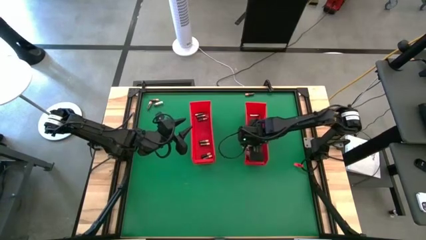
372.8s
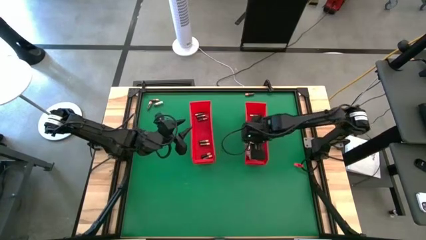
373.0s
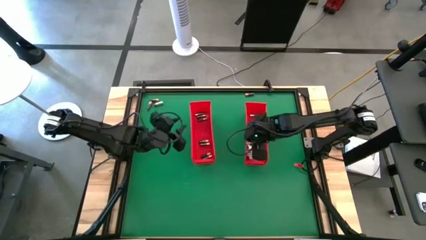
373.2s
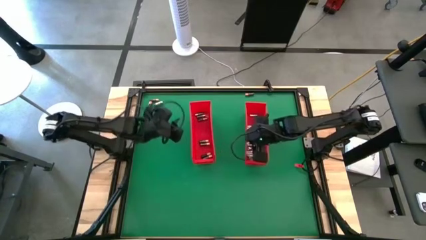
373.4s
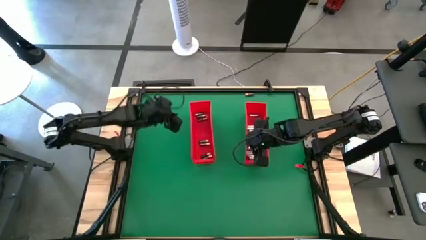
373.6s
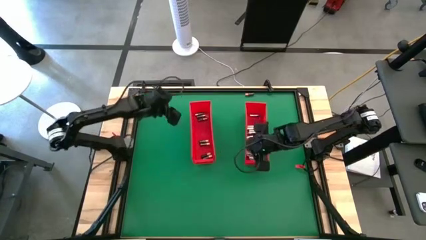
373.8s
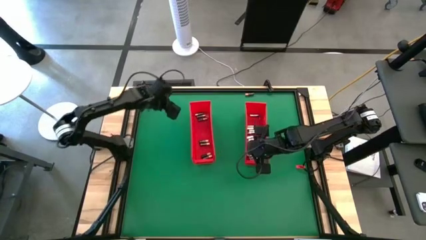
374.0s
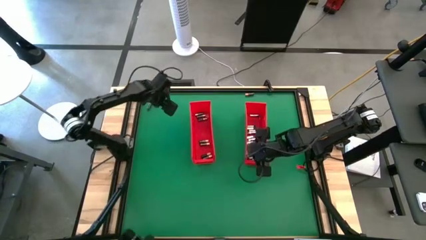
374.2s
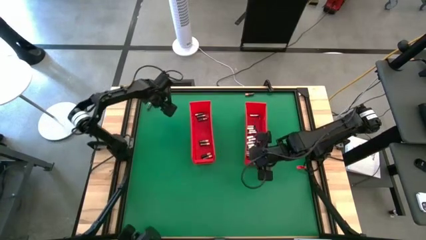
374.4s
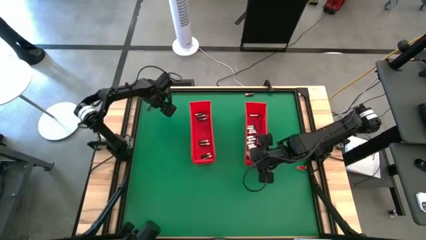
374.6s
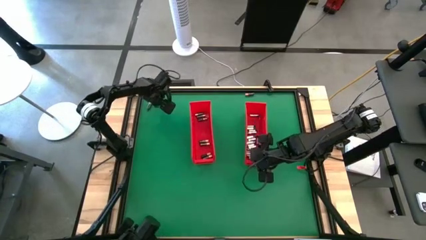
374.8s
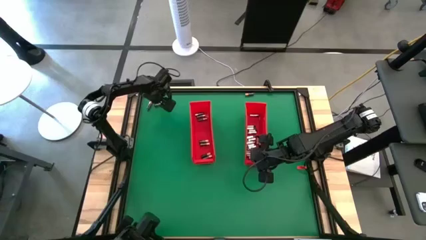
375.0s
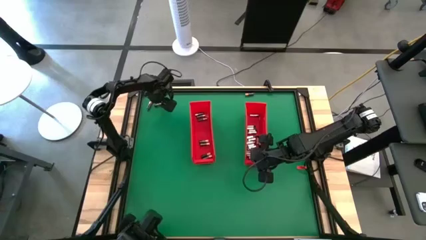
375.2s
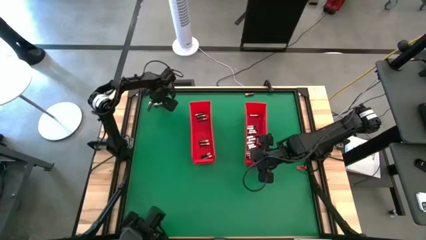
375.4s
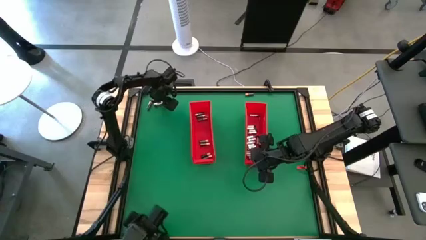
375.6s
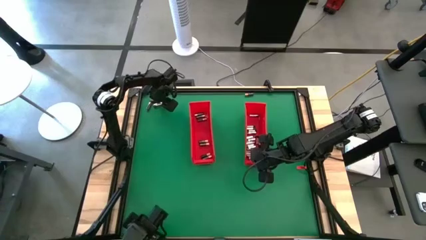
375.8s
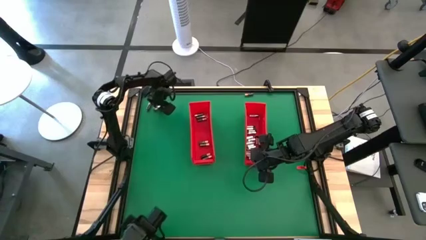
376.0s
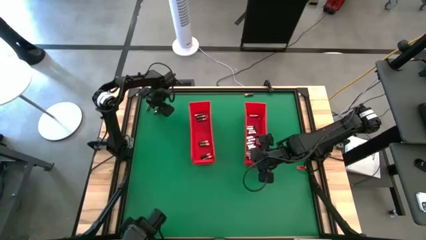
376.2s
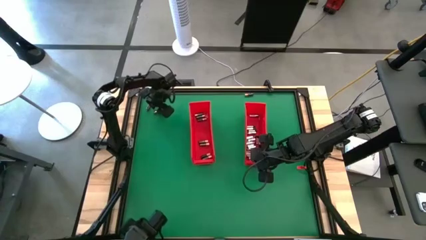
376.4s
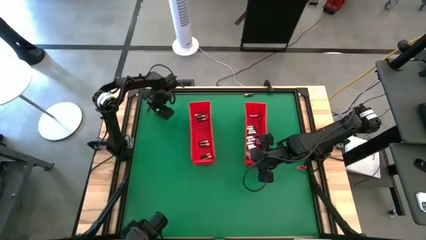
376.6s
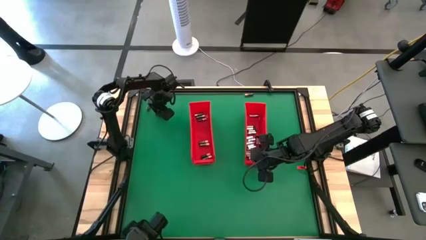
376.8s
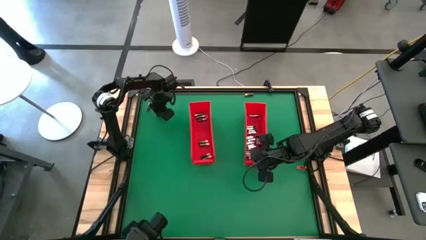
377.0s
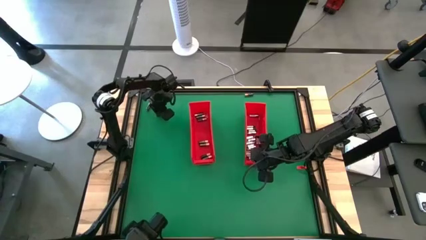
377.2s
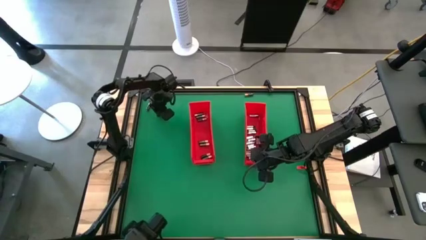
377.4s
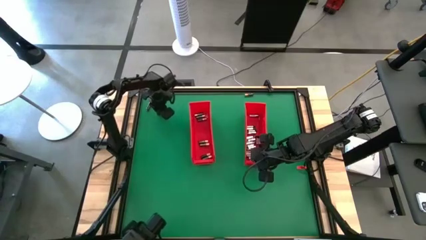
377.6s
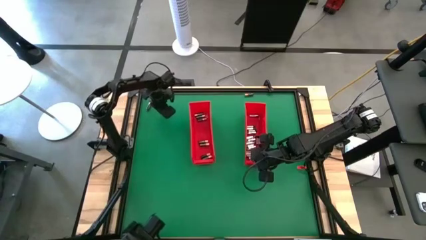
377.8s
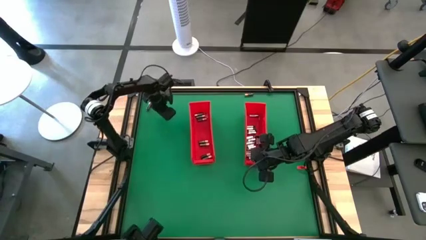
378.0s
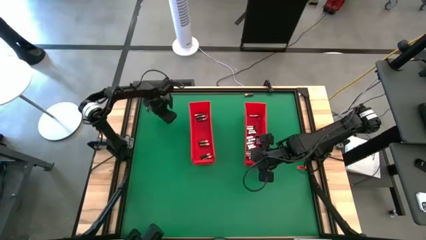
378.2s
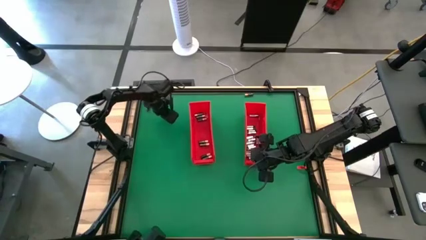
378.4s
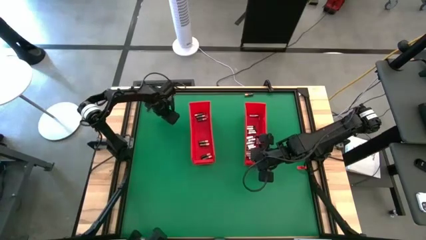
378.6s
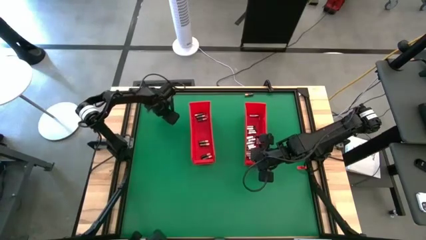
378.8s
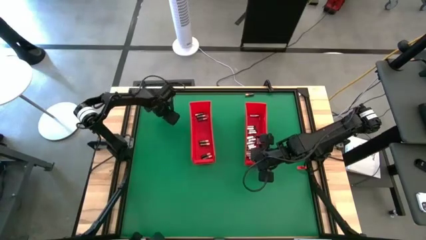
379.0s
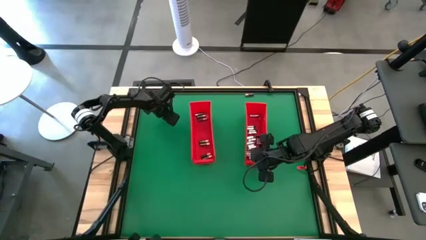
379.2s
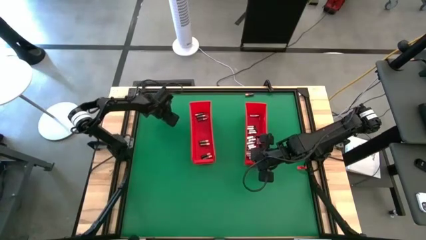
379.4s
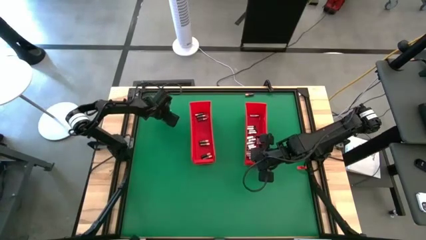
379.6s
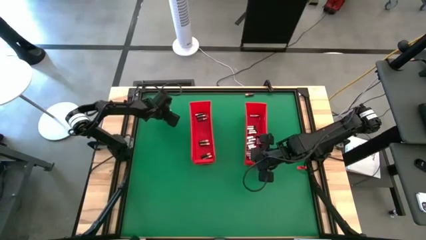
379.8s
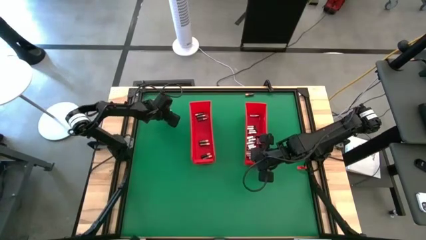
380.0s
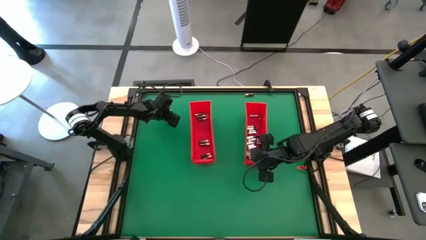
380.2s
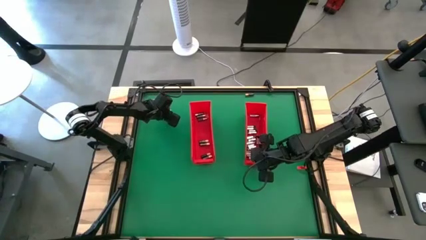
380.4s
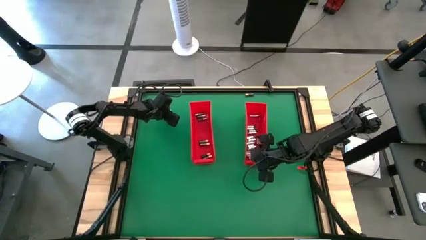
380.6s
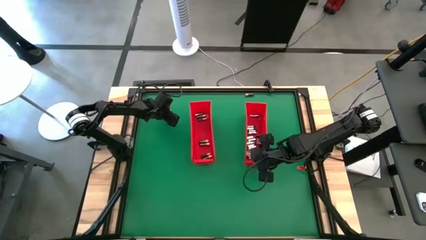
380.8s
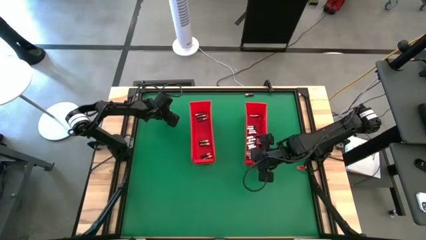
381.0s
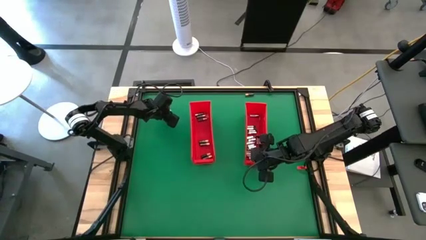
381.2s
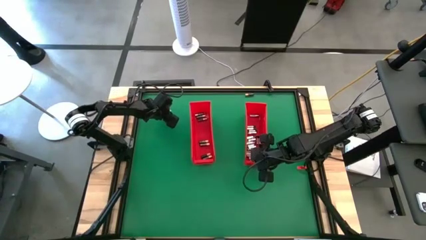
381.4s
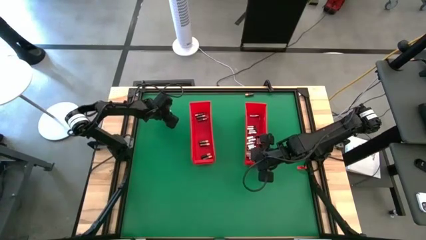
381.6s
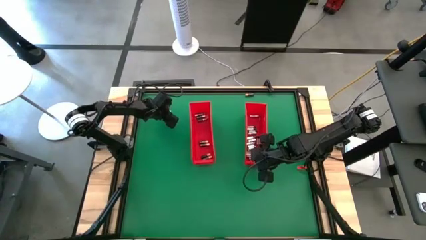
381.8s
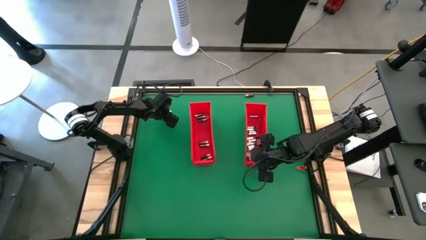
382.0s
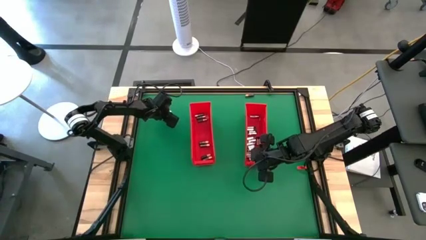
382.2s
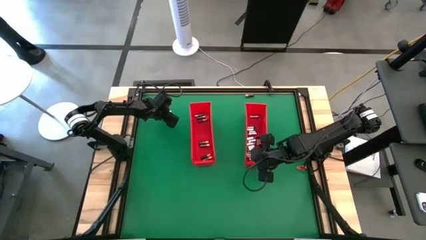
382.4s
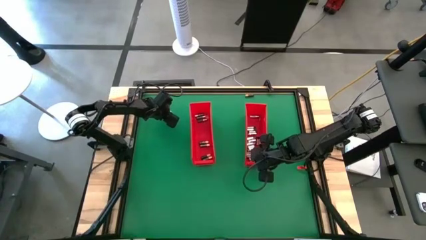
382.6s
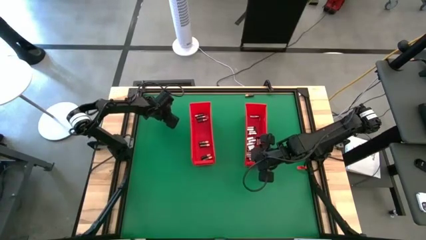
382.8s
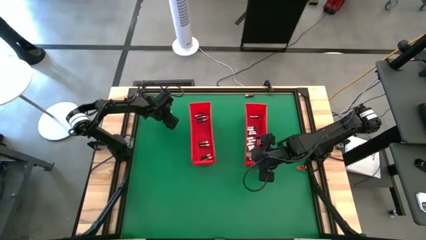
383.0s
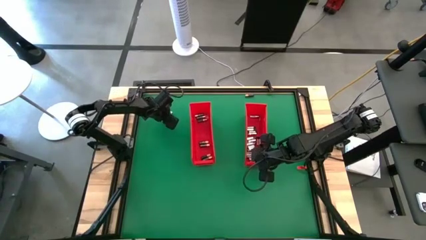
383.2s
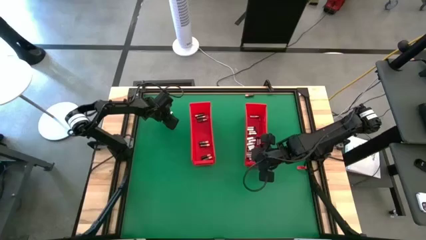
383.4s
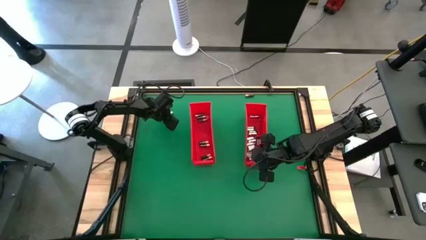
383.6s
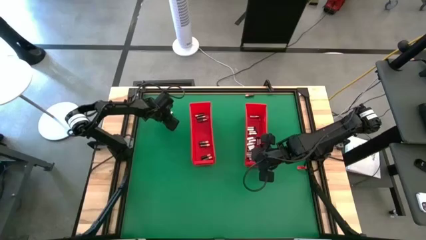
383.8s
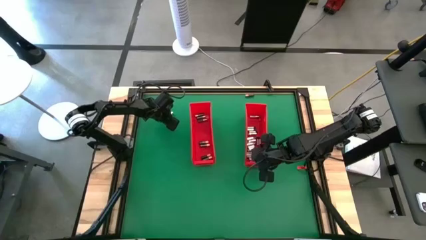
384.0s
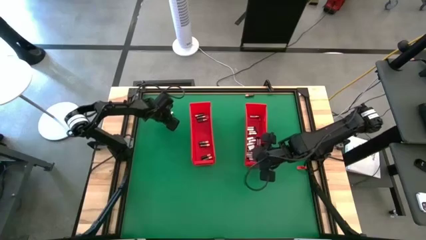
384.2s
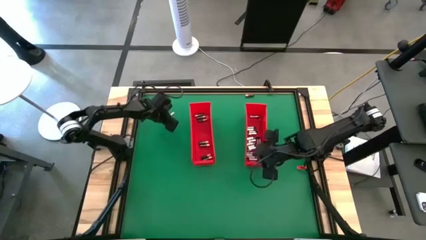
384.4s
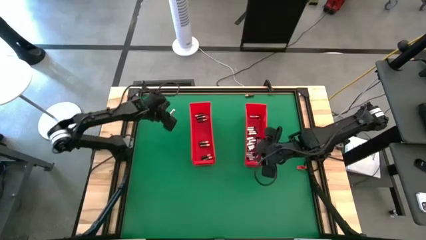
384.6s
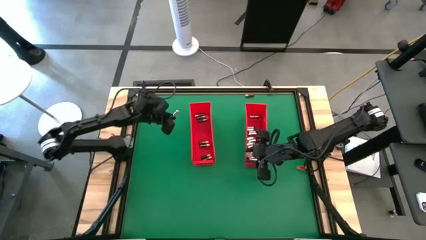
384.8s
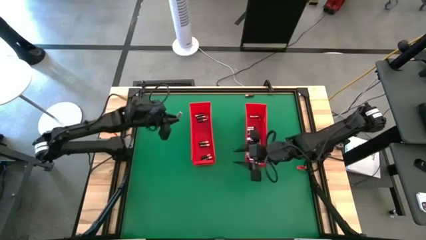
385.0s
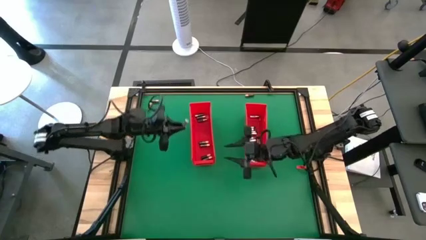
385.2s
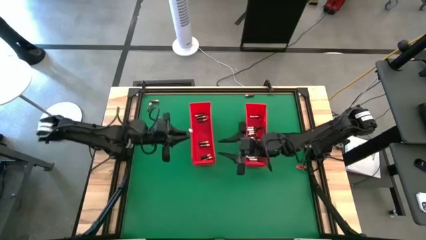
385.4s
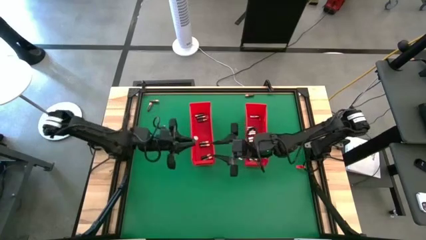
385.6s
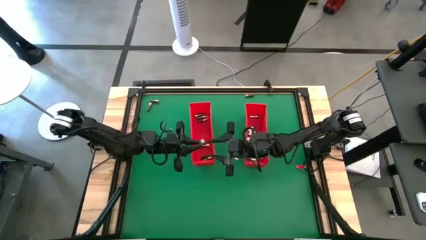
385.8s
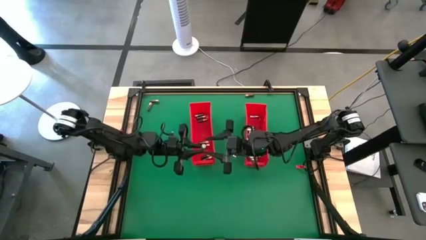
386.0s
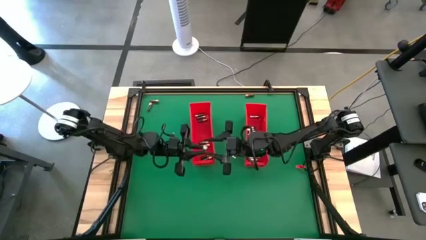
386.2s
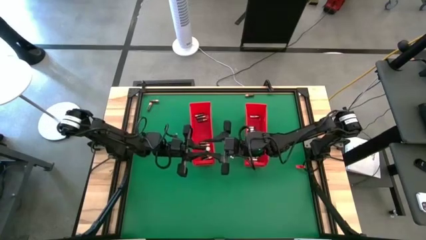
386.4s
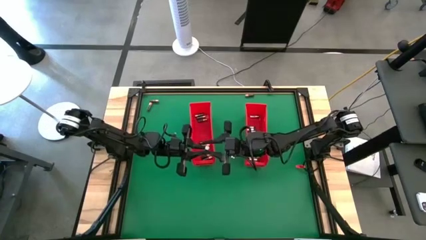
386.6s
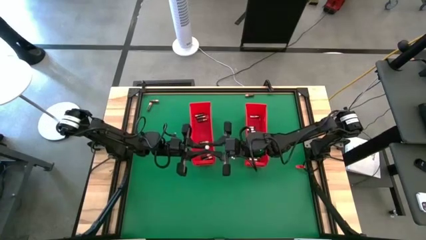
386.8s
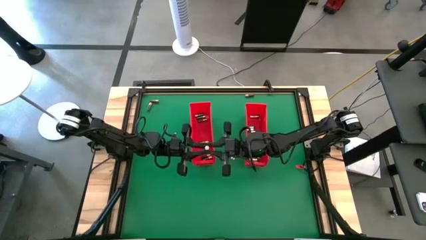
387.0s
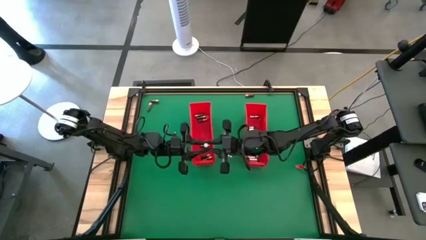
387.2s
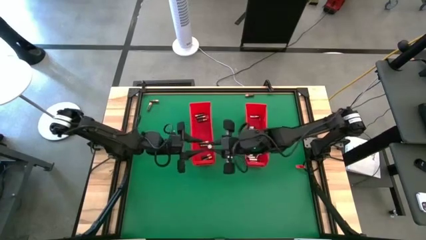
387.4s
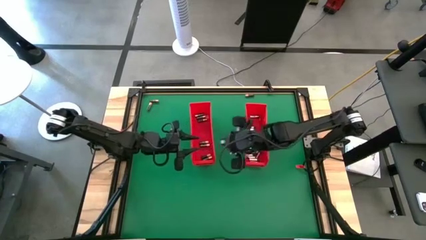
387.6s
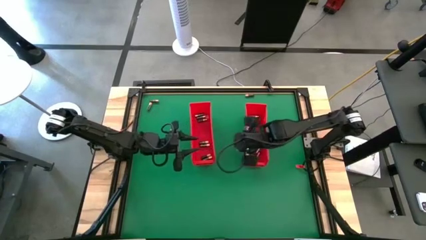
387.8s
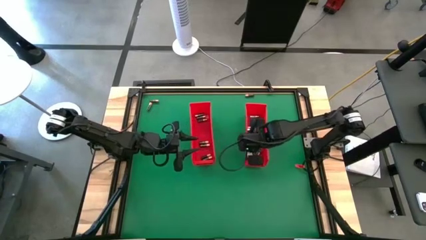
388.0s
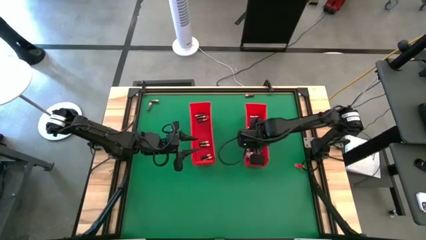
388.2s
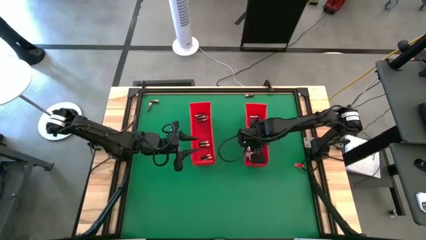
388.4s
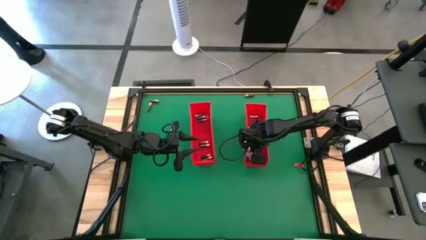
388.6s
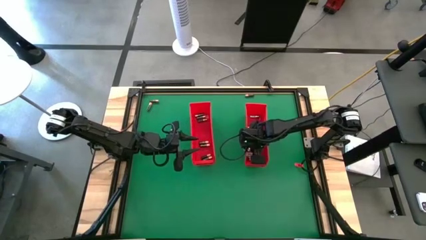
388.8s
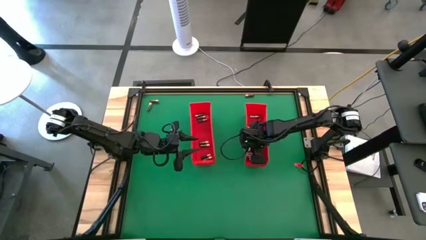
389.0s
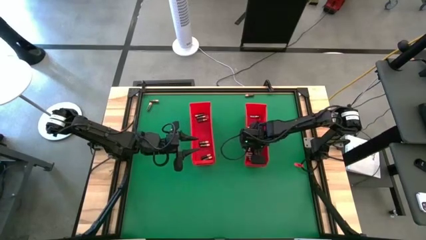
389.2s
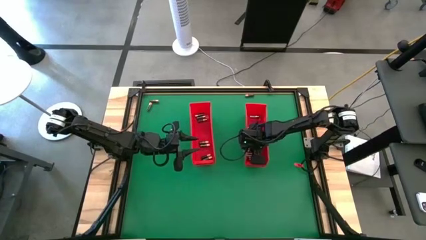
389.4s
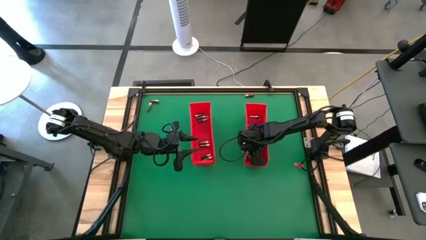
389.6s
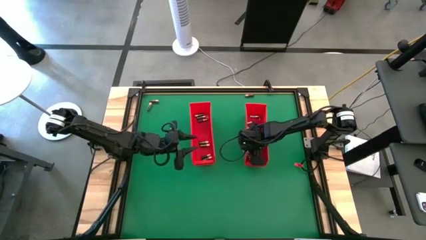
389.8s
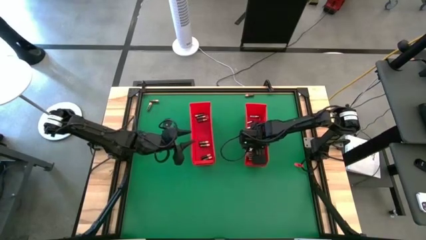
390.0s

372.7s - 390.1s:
Task: Sort batteries
Put the silver battery into the right red bin
